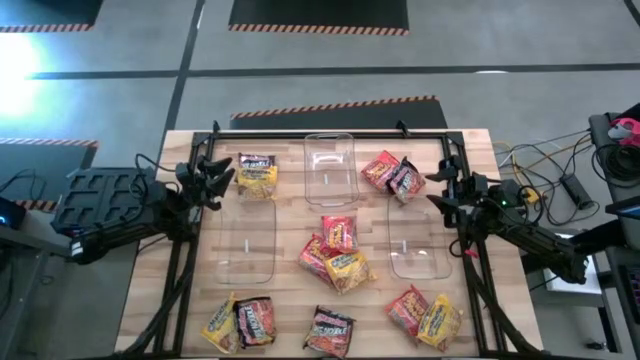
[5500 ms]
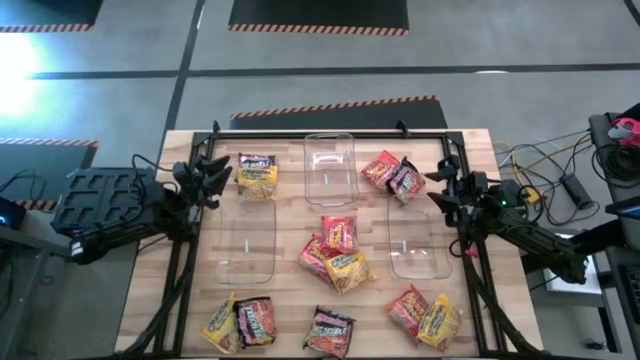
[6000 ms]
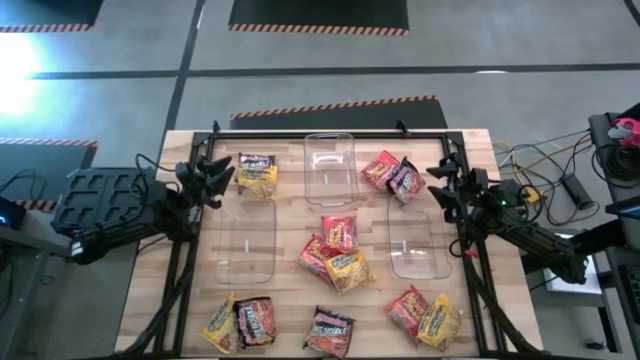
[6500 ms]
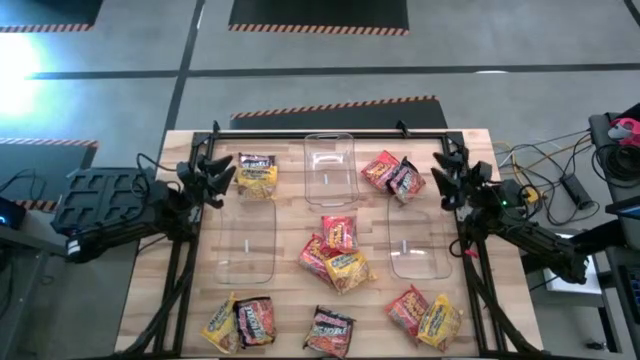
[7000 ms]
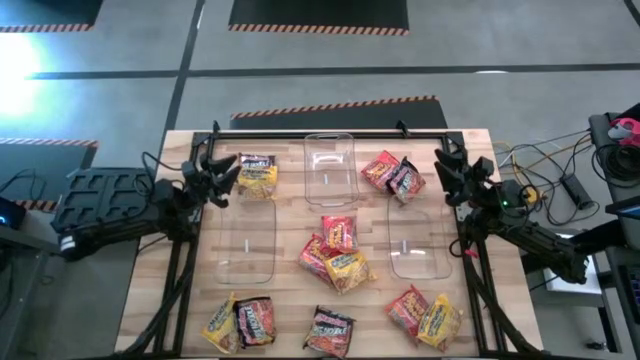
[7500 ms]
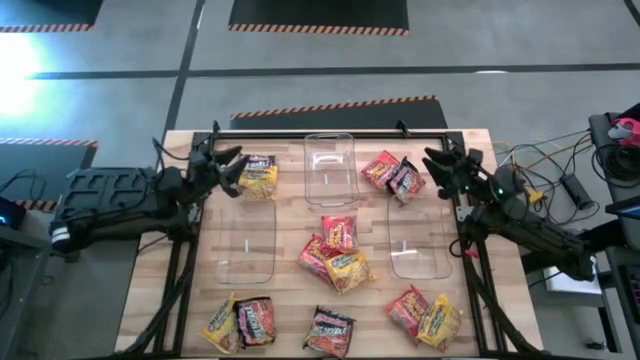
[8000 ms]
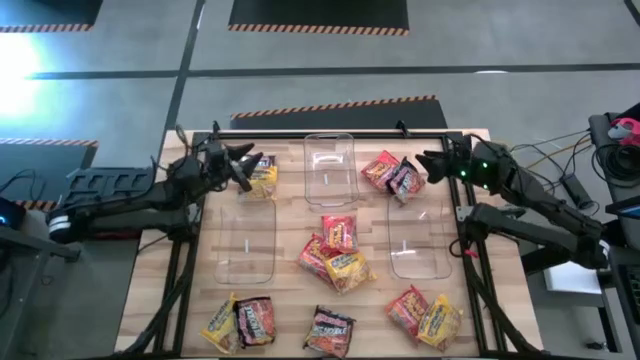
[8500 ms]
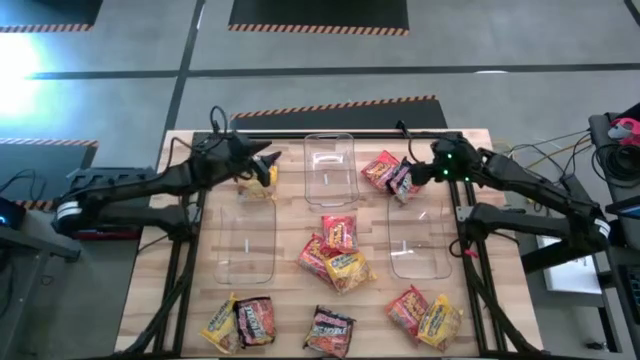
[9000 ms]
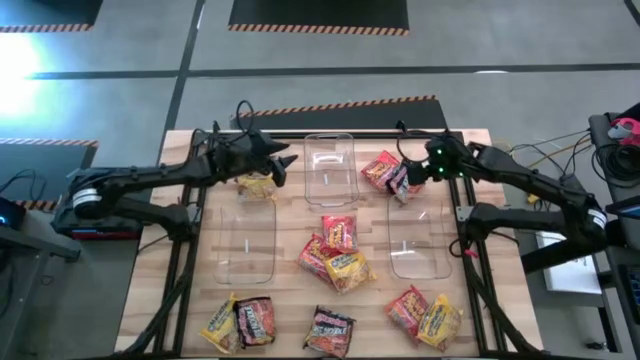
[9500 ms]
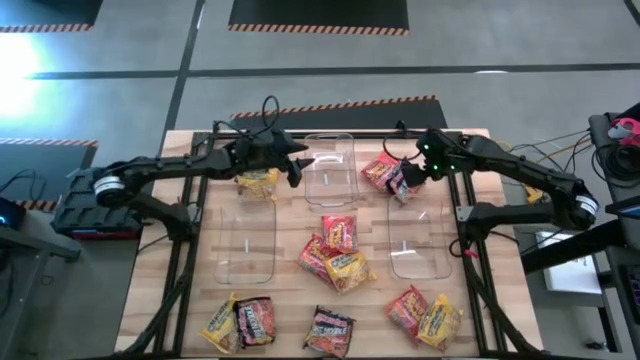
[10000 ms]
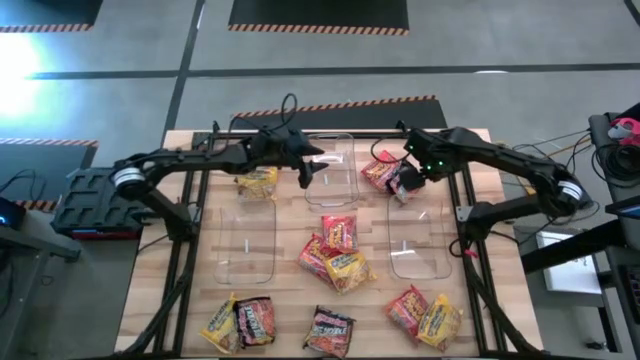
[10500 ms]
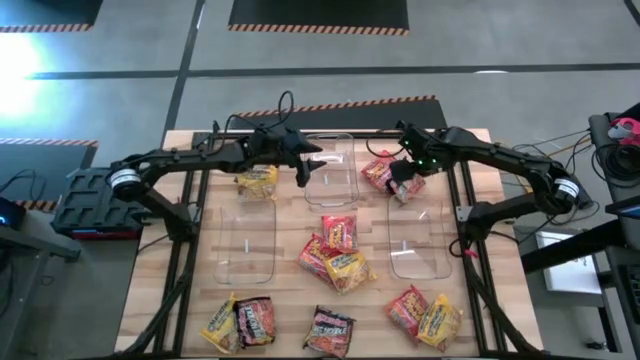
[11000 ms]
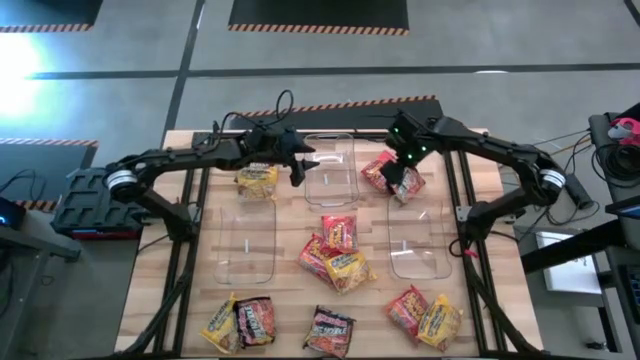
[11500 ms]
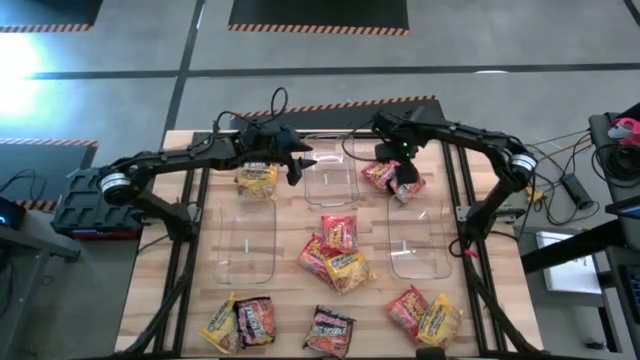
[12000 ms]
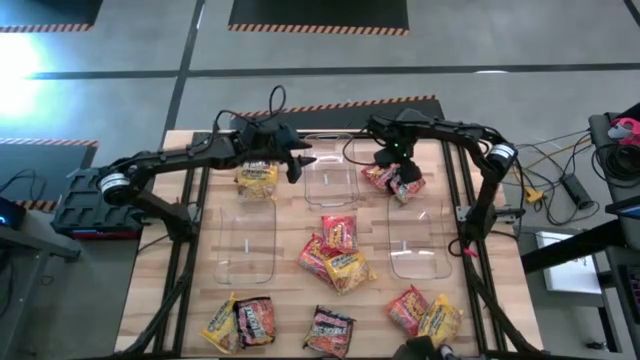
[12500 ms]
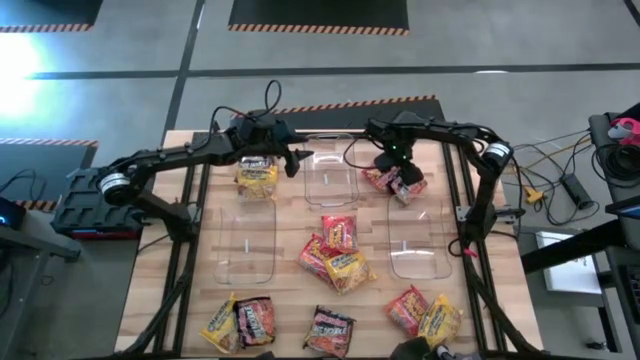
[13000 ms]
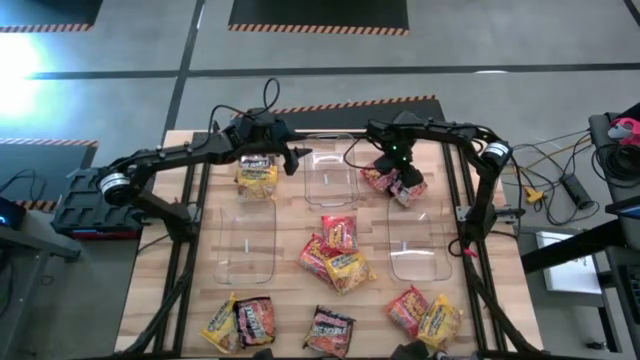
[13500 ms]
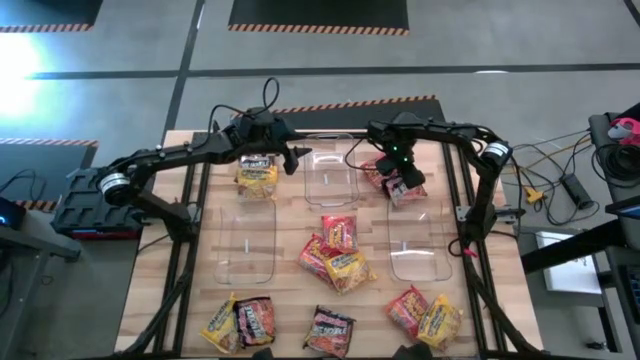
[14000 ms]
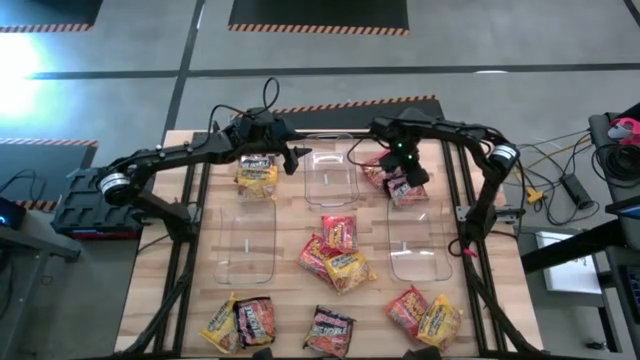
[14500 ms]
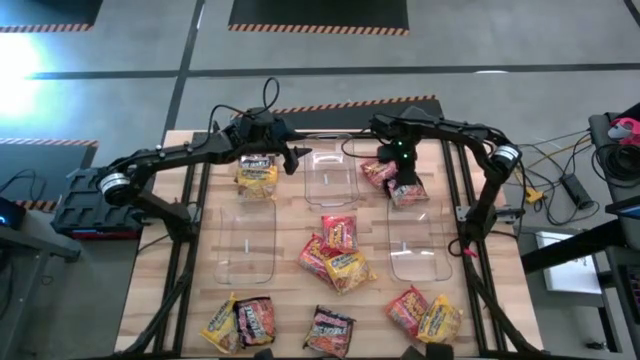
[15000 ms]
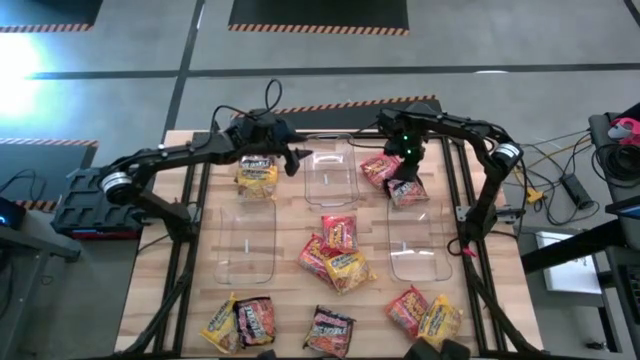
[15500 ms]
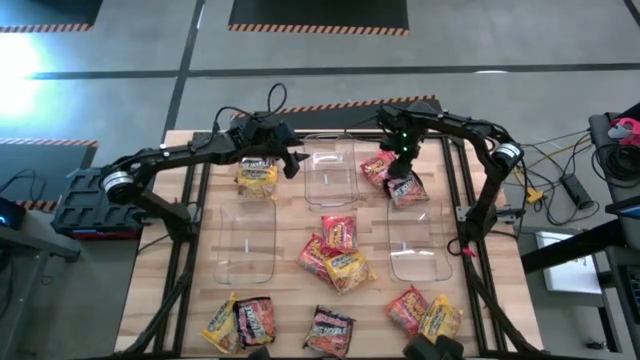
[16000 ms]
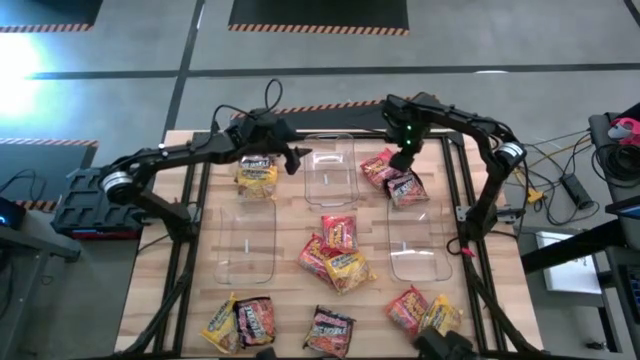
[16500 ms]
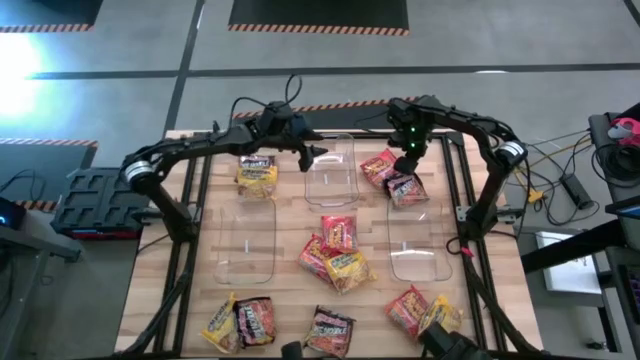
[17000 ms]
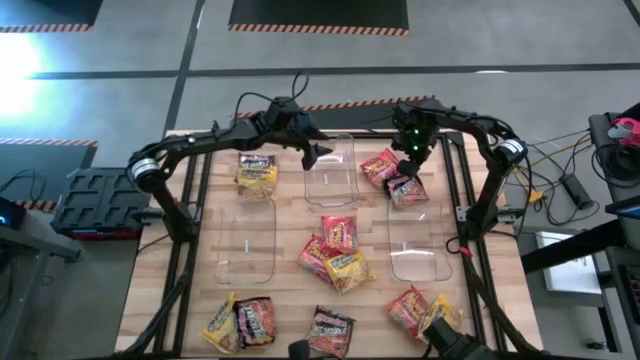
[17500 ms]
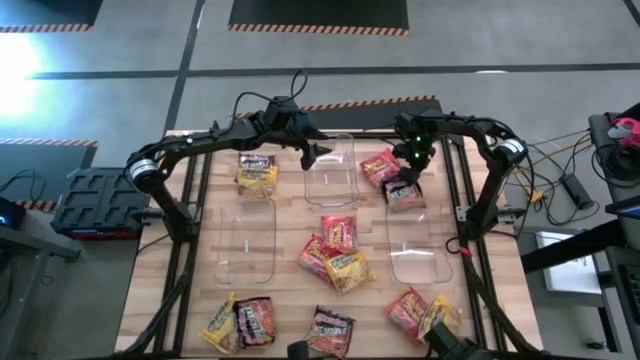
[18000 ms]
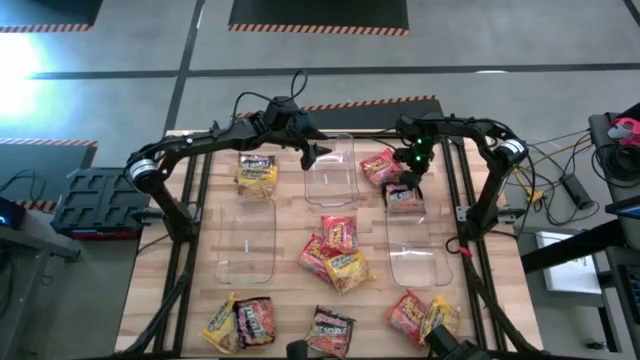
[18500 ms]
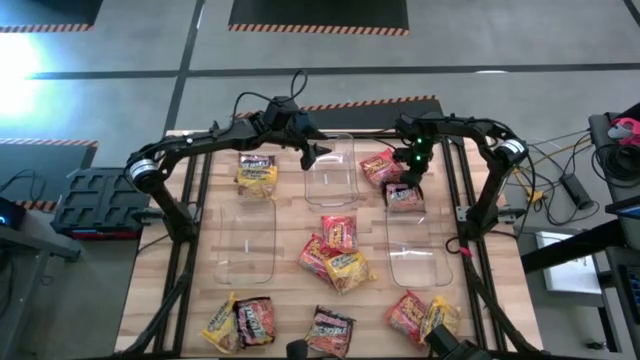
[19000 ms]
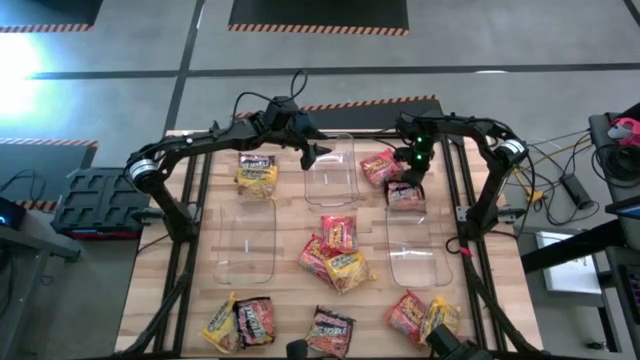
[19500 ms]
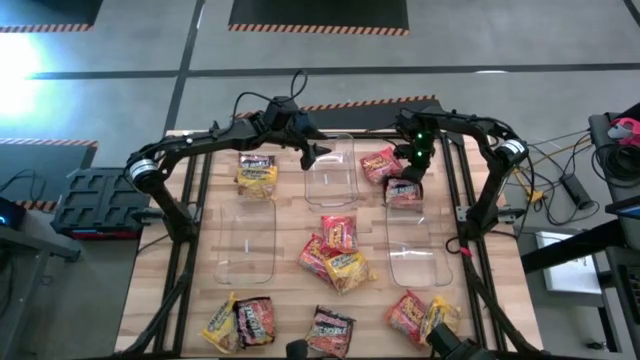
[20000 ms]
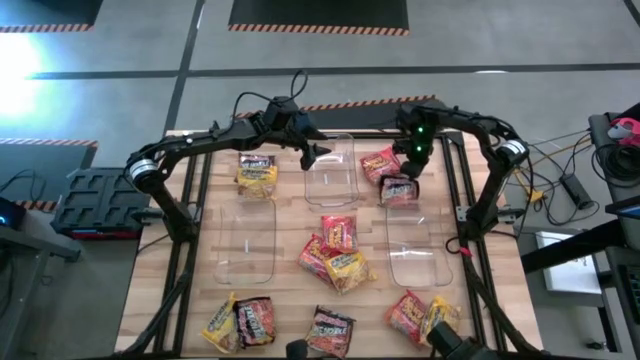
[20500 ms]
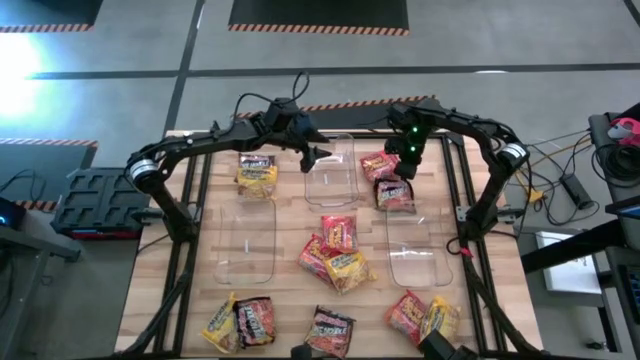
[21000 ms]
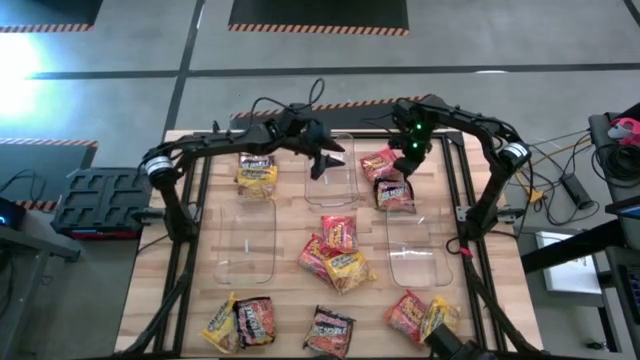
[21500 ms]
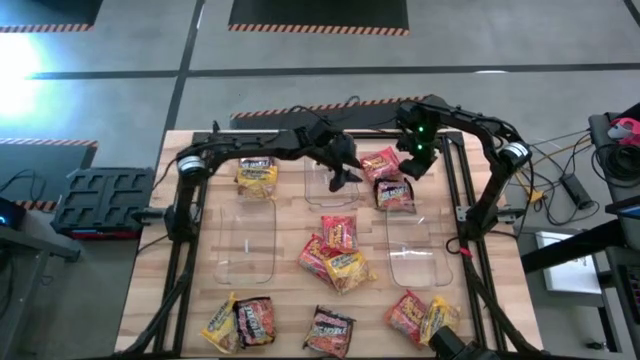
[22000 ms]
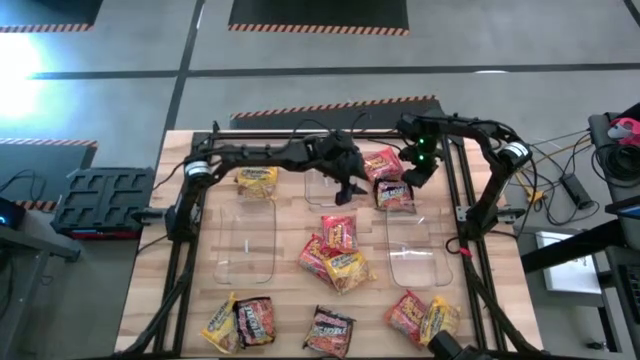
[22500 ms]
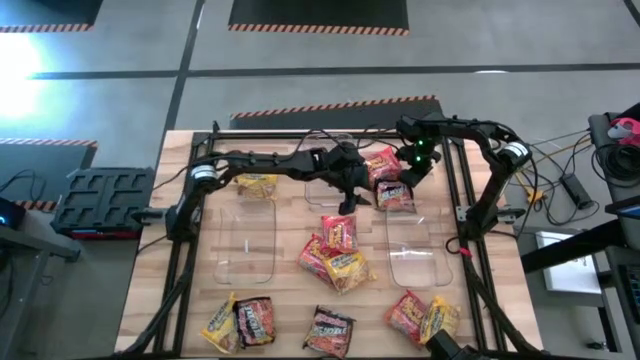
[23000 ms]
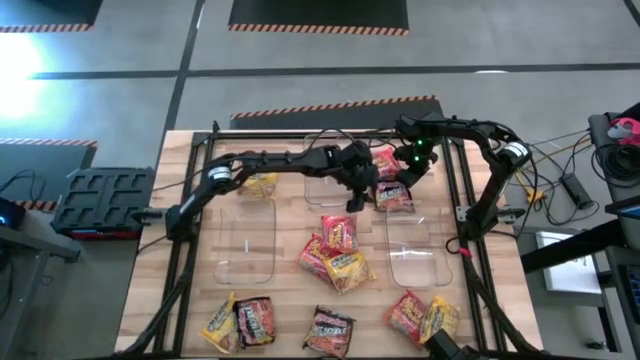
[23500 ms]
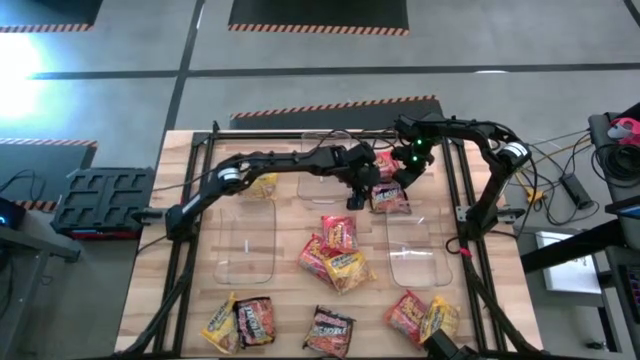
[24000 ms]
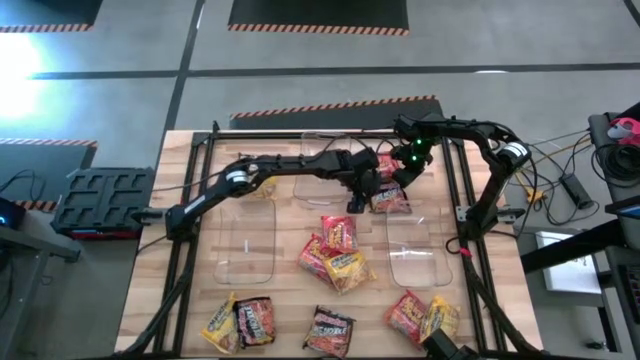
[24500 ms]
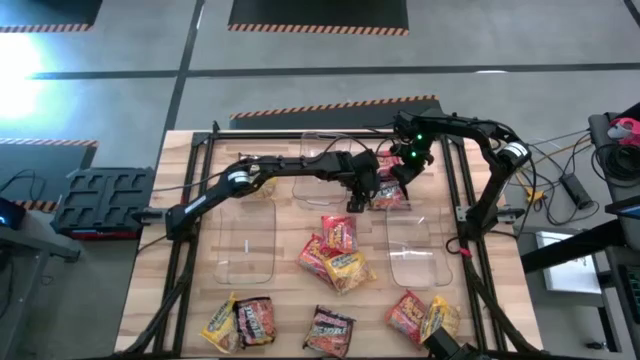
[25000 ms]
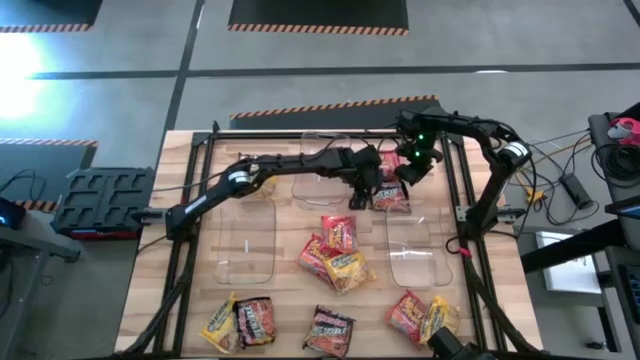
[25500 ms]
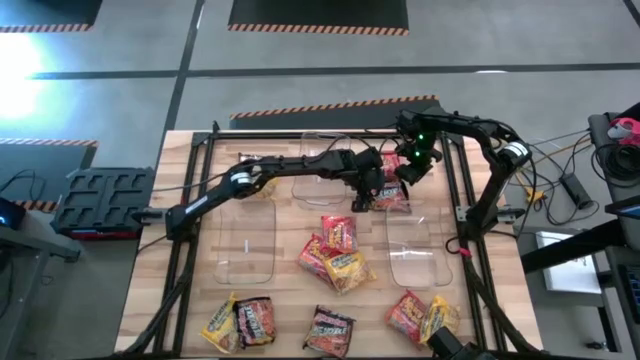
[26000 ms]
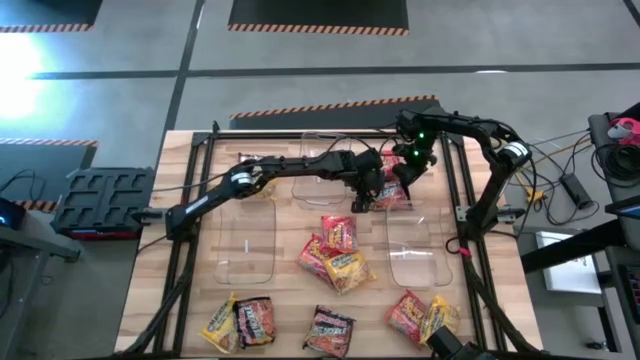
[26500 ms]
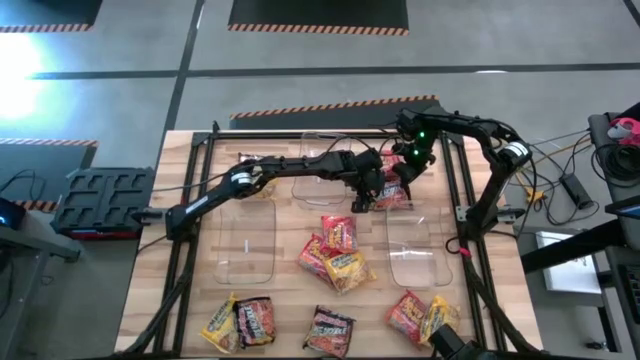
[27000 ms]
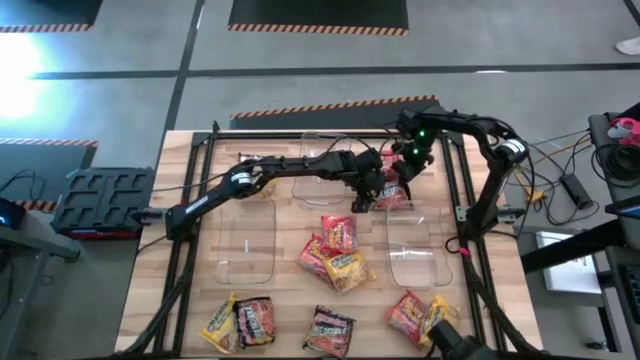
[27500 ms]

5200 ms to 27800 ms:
Task: Sort Maruchan noodles
Put the top right black pack noodle into the bottom right transparent bin
